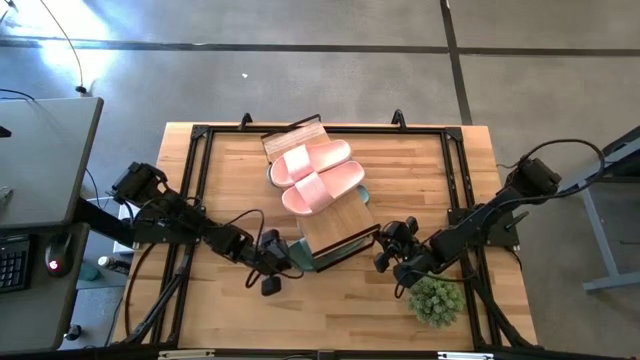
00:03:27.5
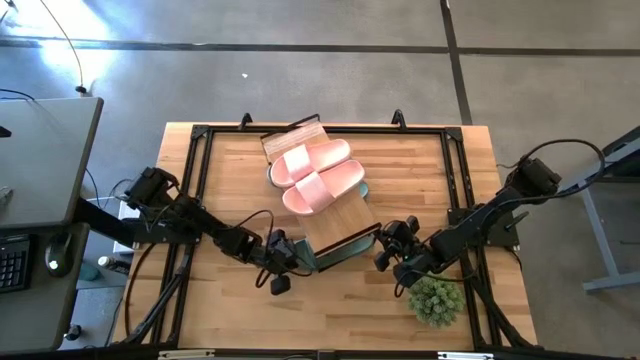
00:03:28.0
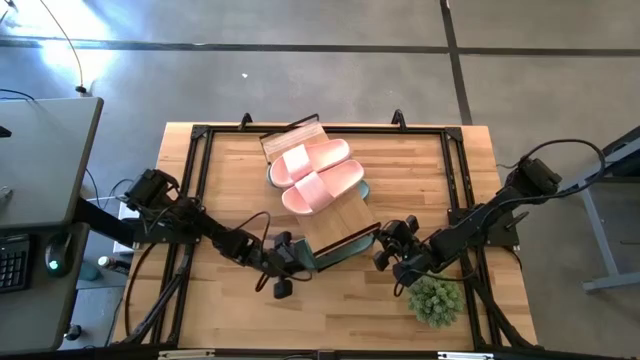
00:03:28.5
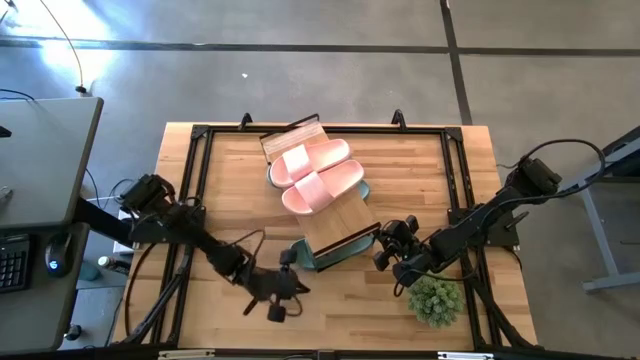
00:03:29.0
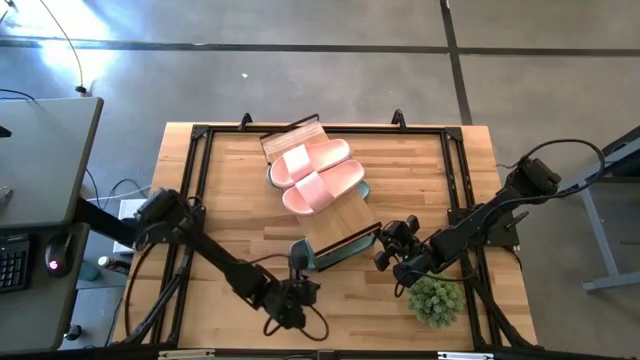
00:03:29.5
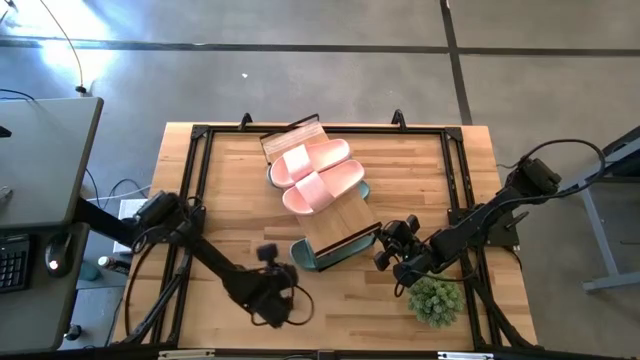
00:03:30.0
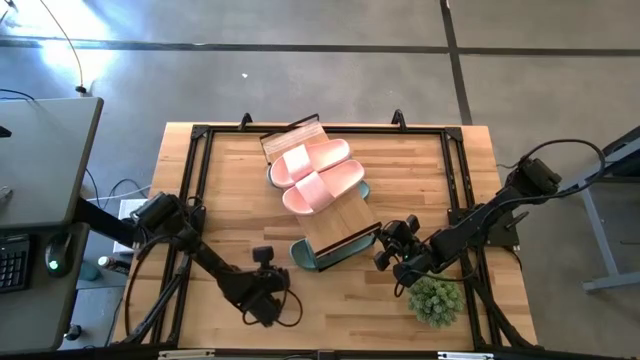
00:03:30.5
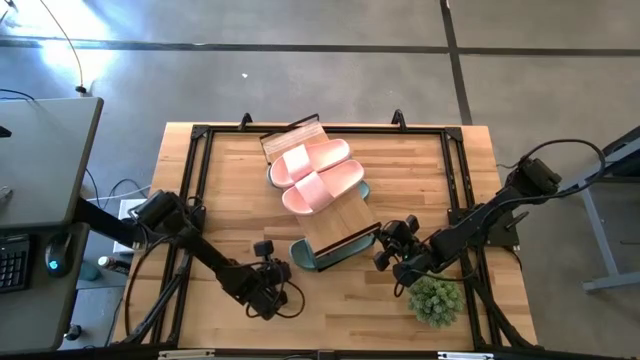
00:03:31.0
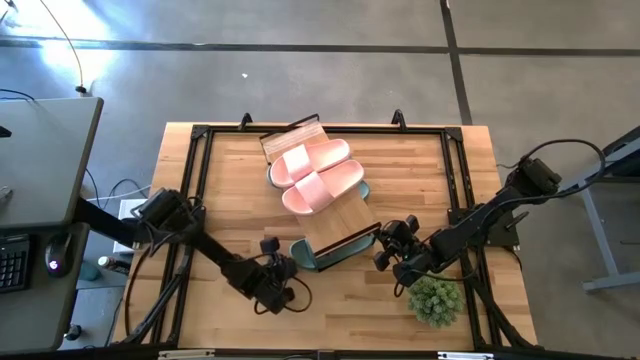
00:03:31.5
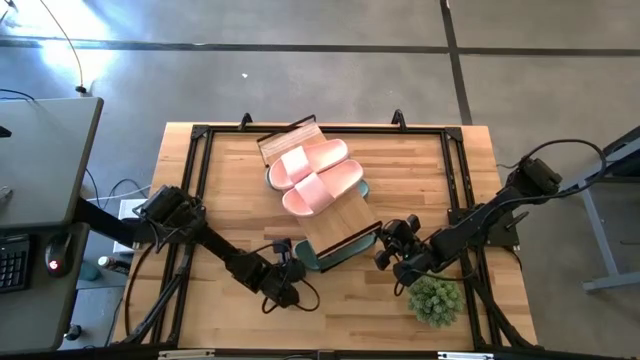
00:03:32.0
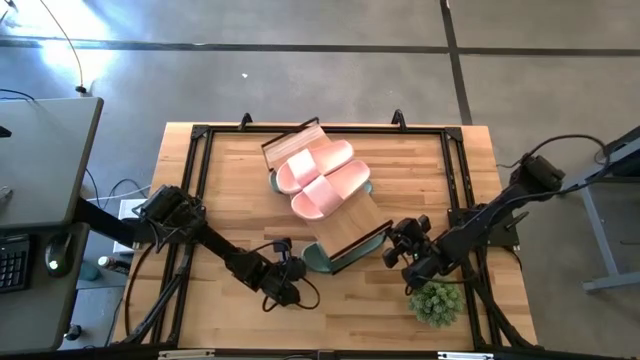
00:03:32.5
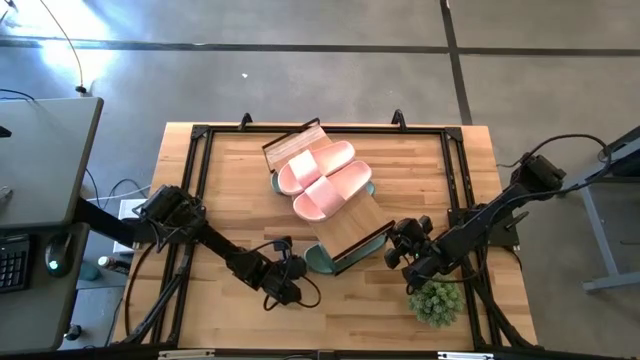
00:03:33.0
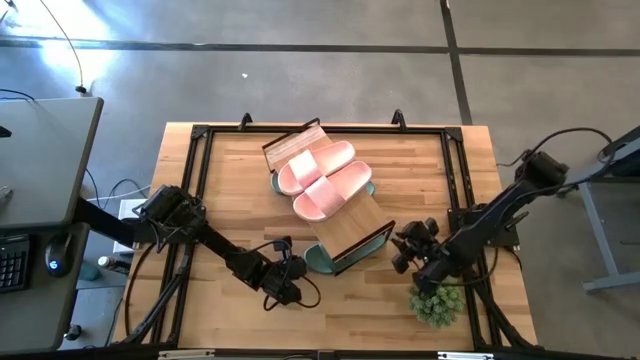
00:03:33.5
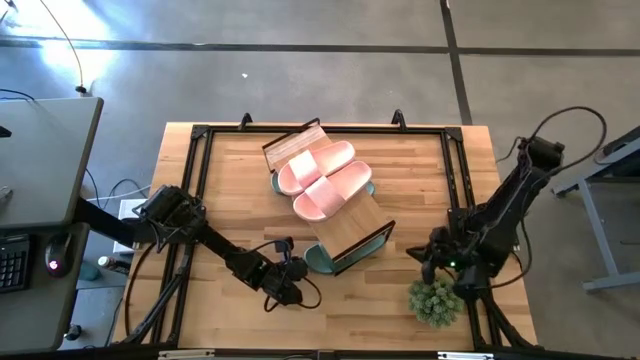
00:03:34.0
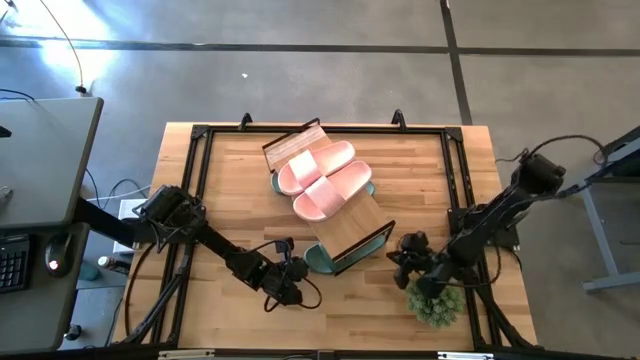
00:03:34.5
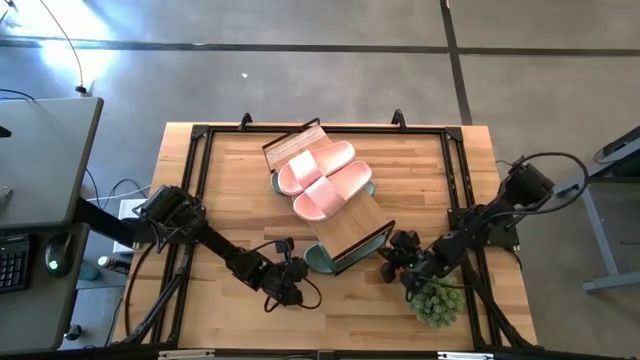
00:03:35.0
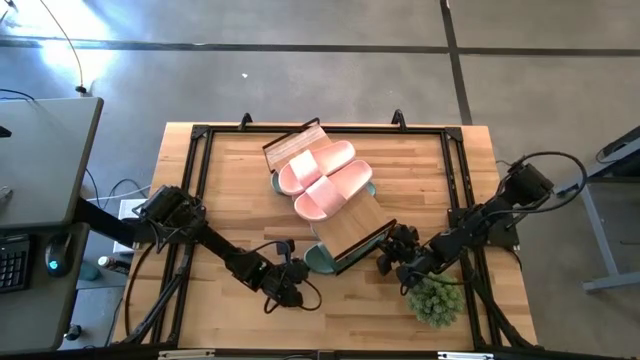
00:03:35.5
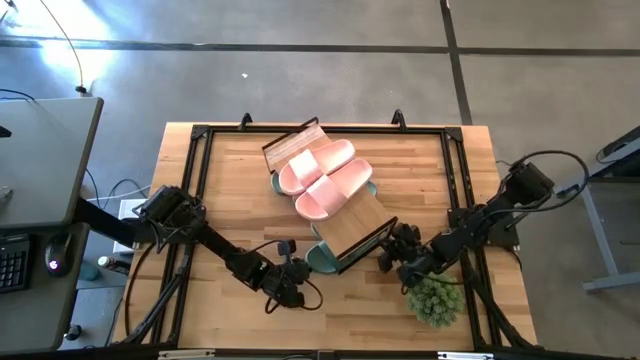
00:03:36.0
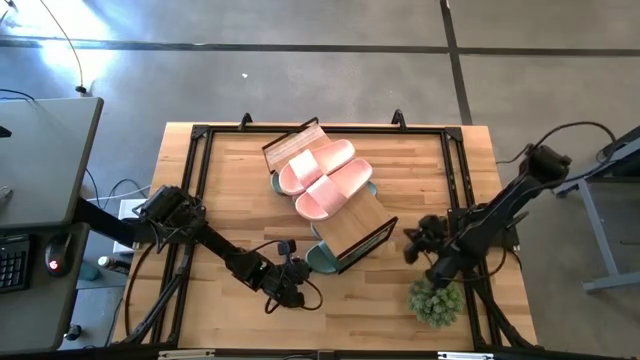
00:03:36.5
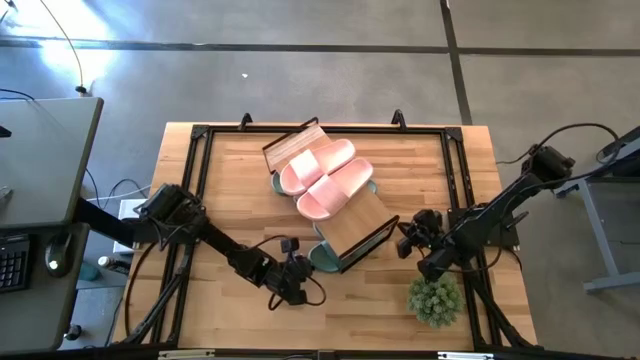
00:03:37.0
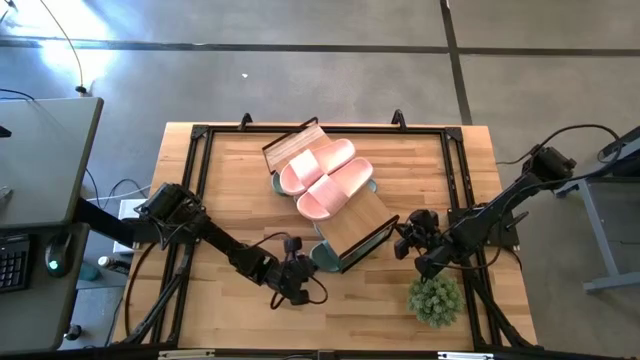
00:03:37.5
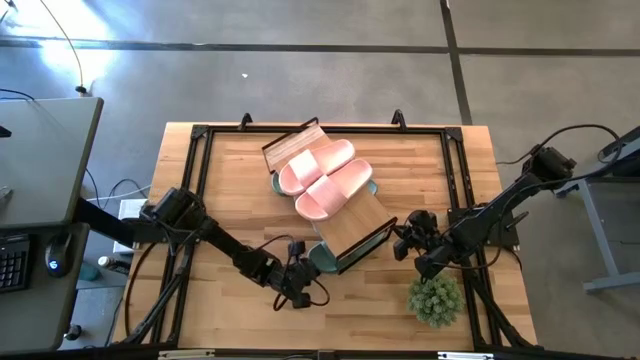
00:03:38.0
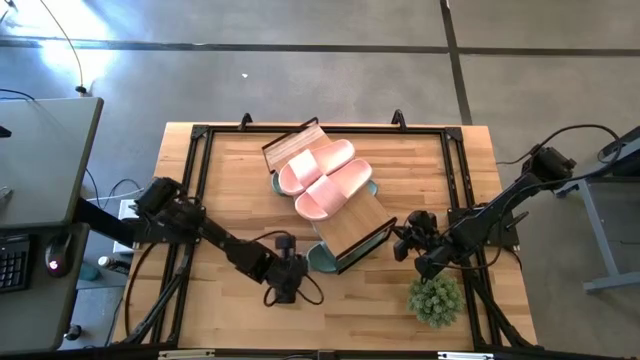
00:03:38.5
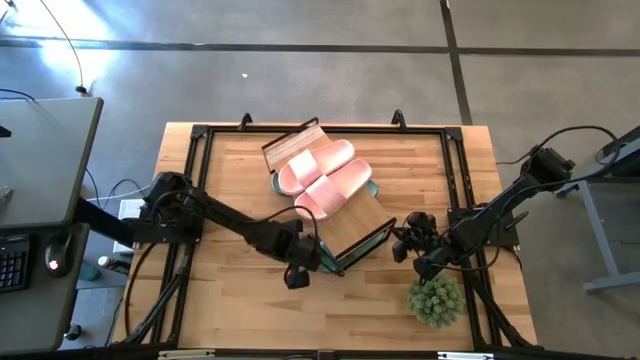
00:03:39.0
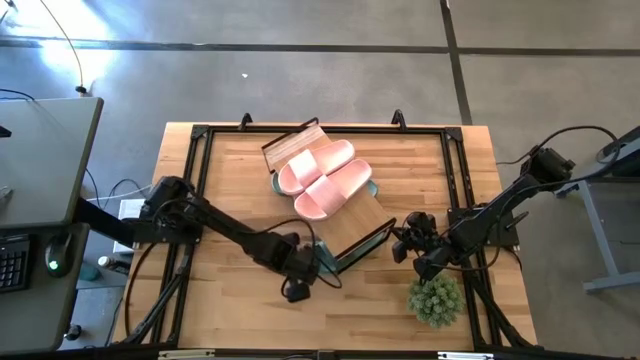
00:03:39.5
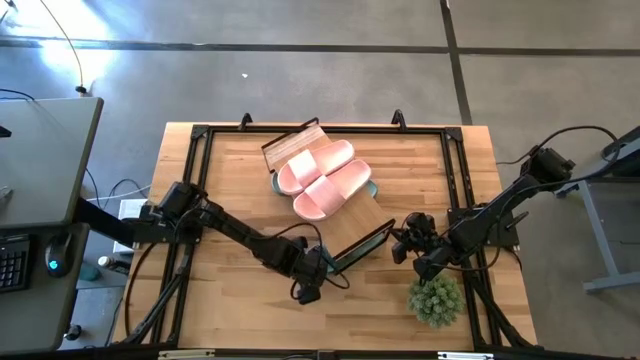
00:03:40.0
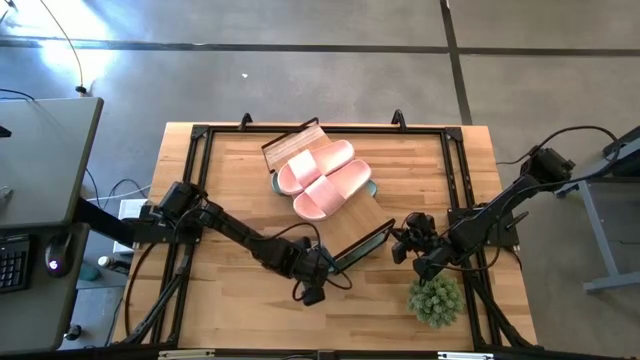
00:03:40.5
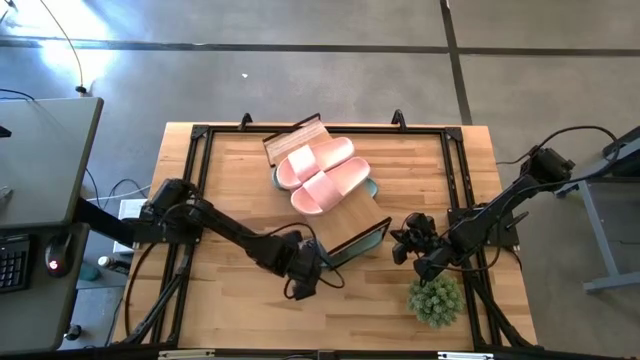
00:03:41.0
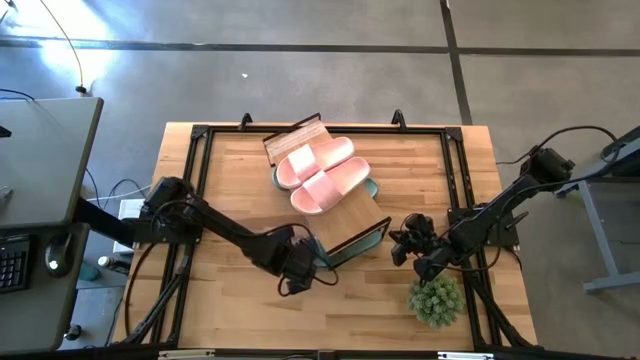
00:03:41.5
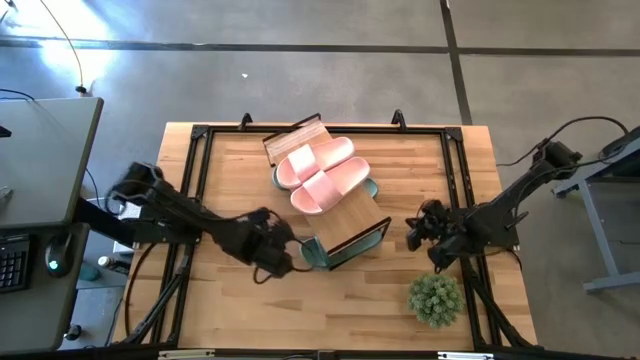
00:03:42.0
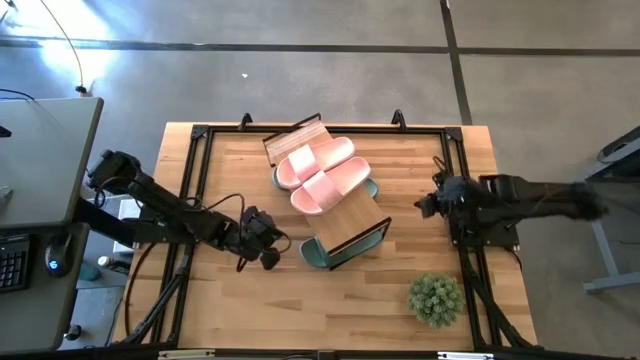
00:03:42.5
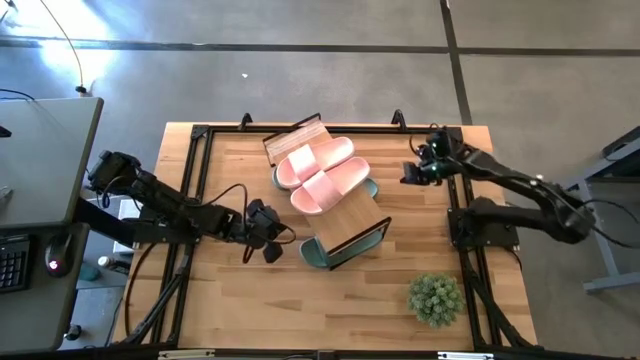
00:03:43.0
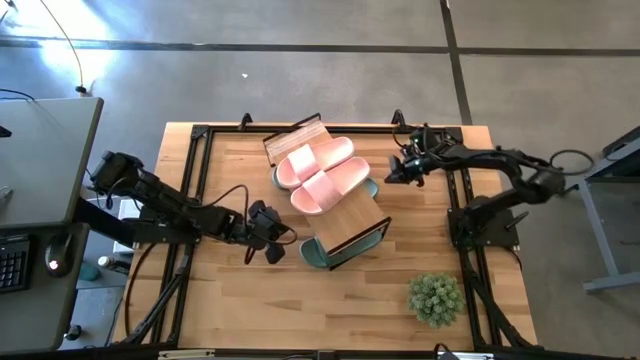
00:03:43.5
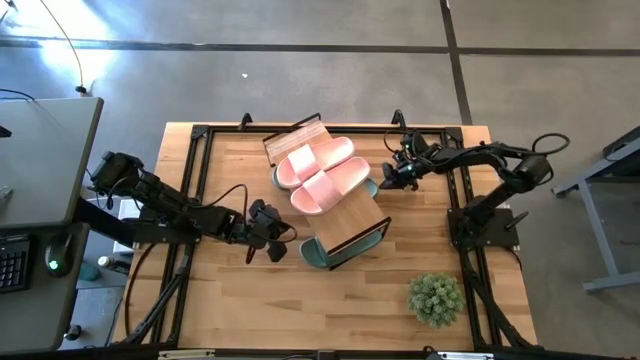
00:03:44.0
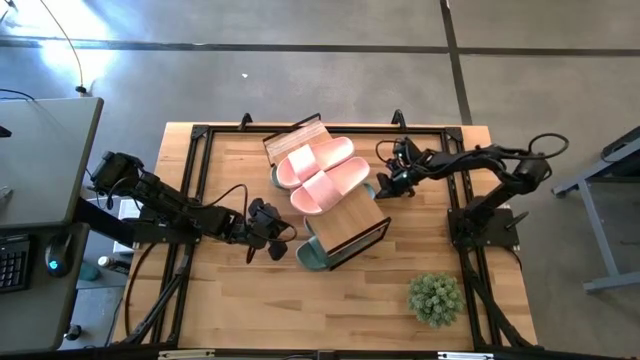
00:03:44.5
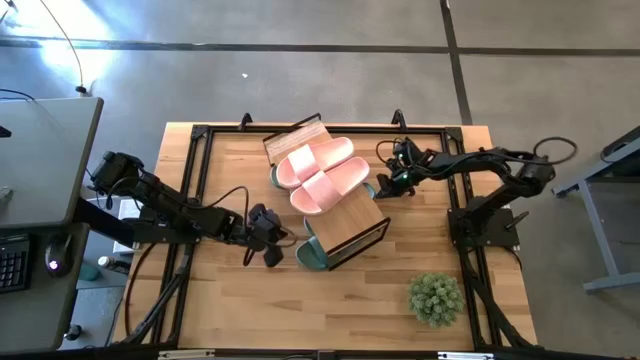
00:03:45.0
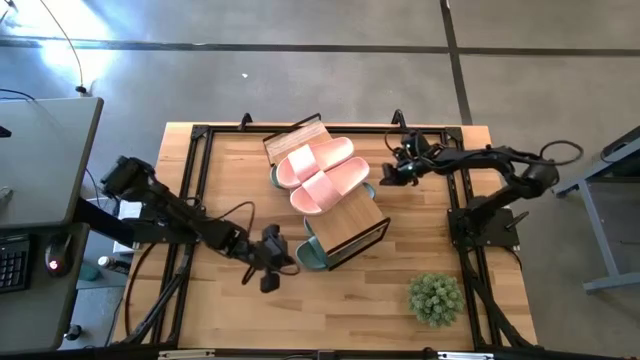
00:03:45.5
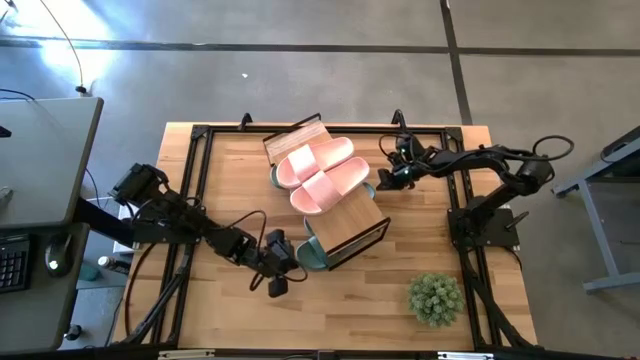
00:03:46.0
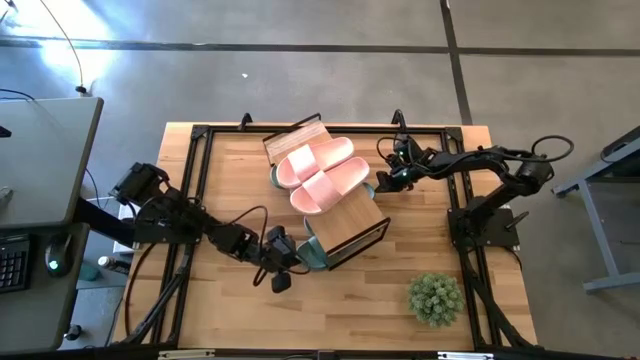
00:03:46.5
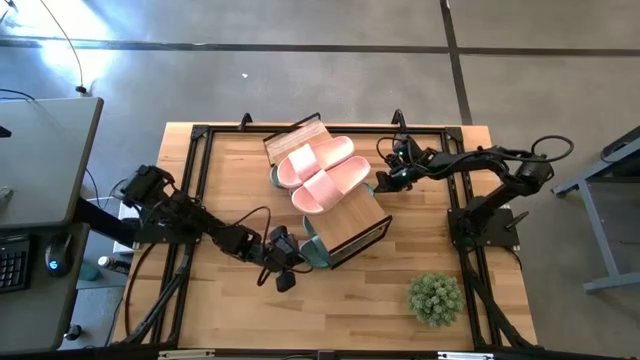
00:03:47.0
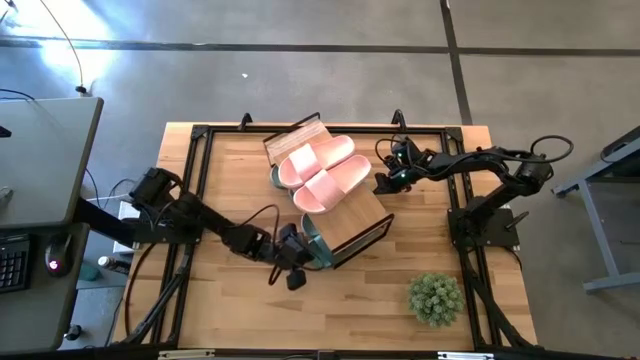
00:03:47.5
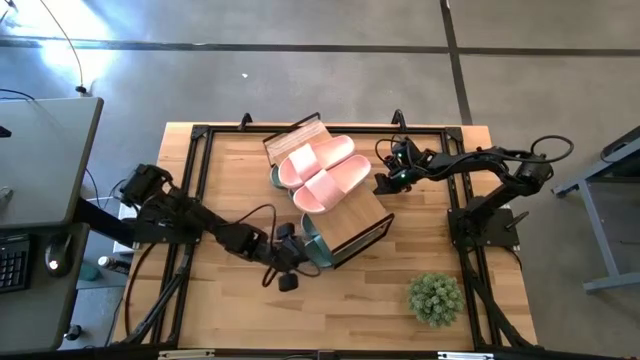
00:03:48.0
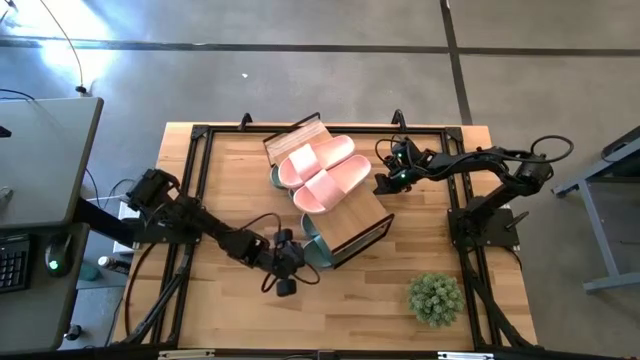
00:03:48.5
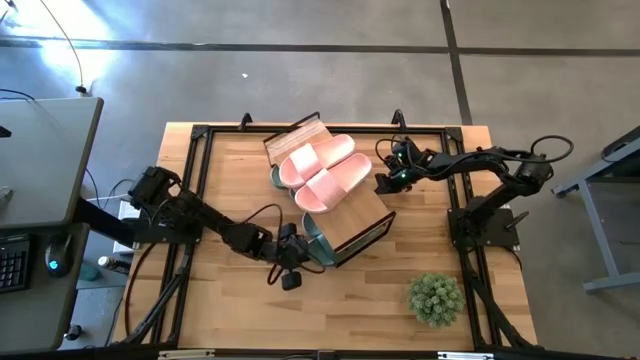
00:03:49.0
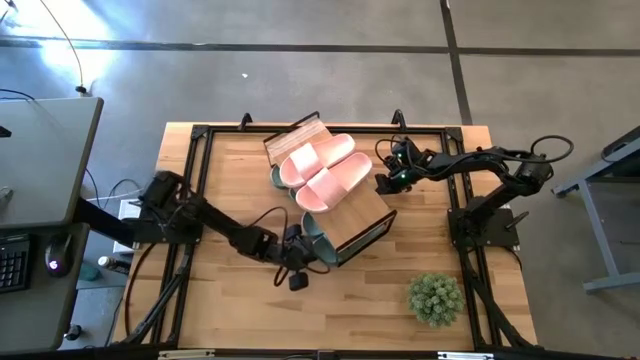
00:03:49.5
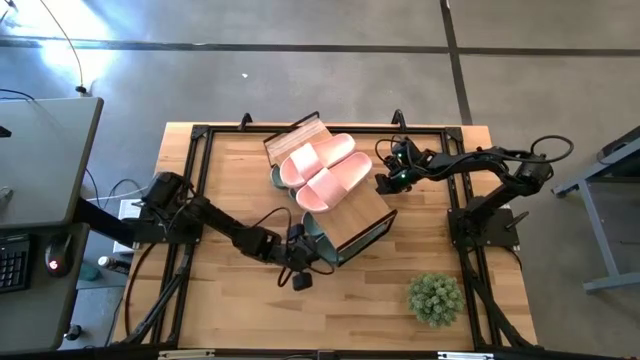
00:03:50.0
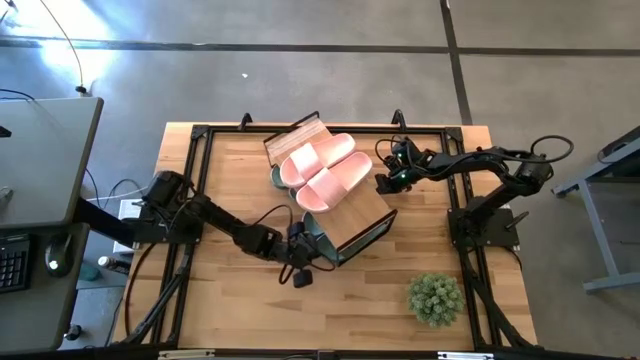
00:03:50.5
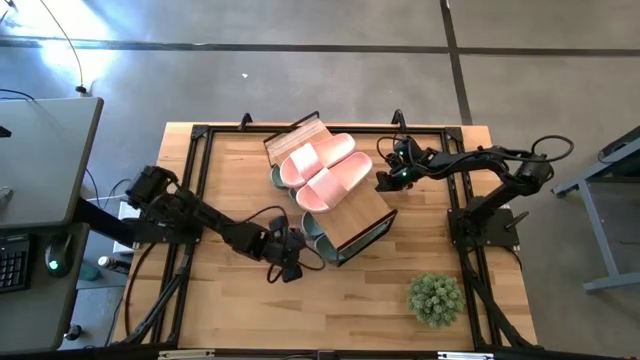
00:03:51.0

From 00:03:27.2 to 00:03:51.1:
Task: Pick and place slides into the shelf
Put the green slide under the shelf
